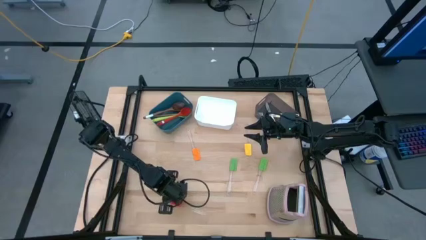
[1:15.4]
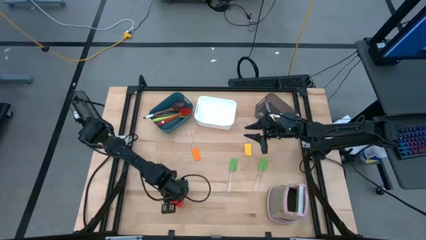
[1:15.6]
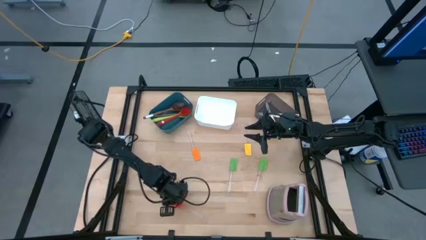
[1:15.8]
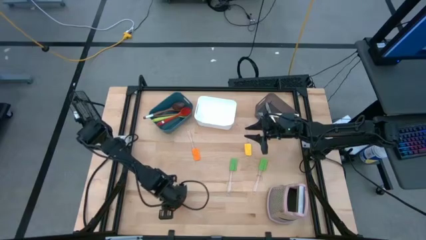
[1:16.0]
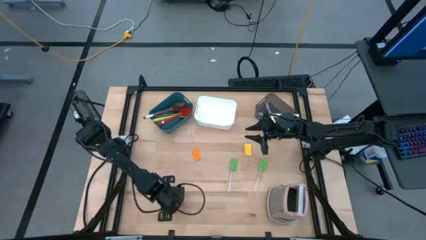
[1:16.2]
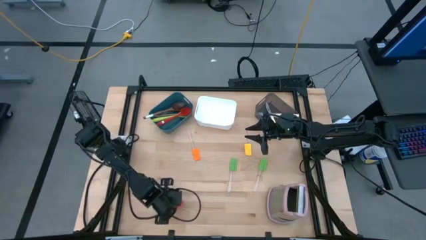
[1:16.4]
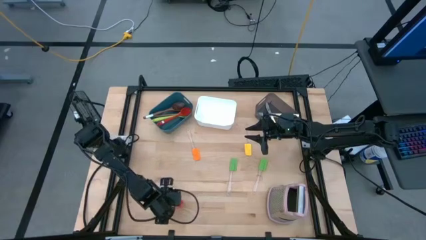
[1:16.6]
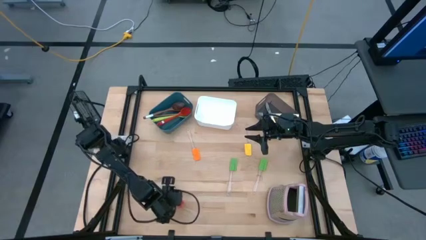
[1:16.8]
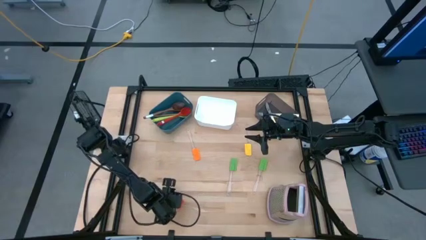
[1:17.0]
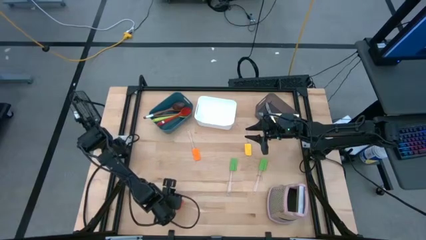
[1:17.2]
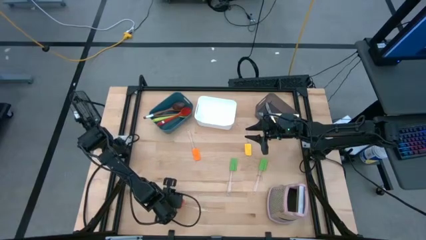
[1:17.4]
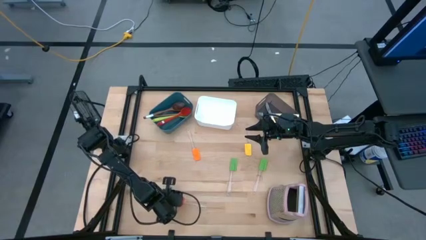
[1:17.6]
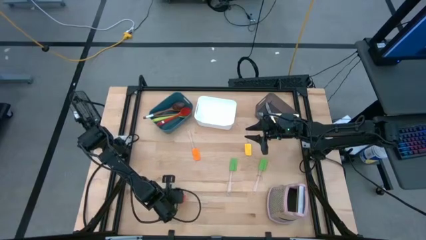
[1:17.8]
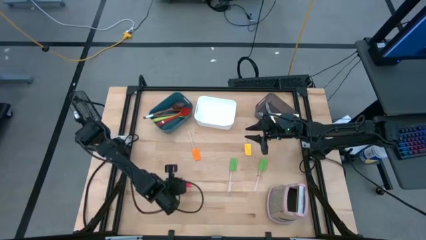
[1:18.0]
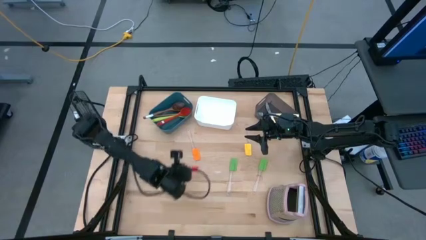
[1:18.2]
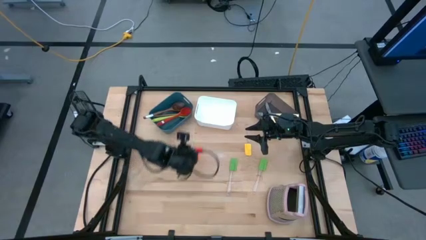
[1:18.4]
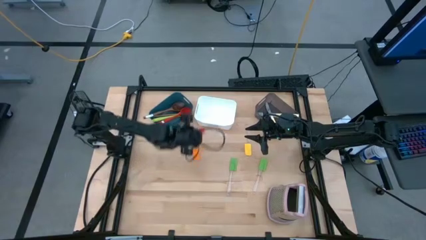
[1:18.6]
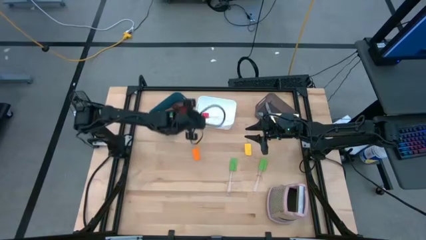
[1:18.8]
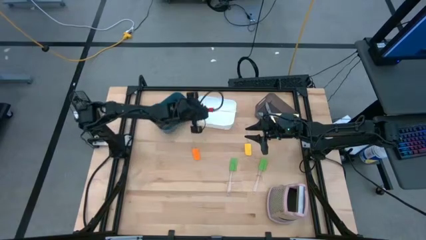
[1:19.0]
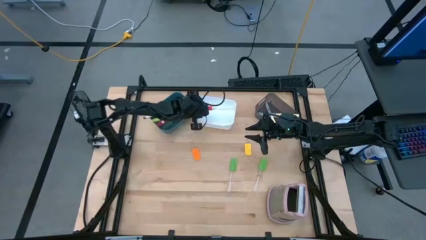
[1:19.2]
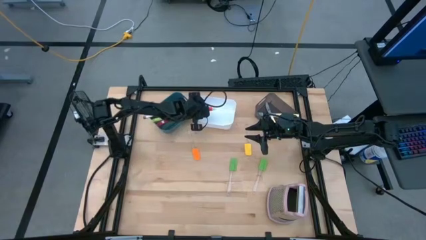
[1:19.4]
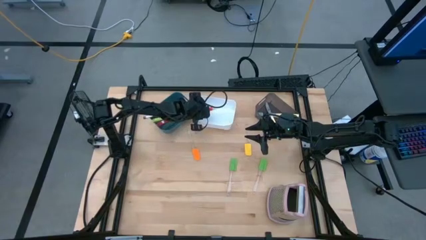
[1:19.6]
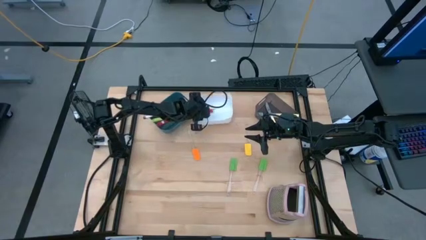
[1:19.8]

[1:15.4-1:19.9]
Task: Pick & Place Kitchen Items
Put the red spatula into the white bin

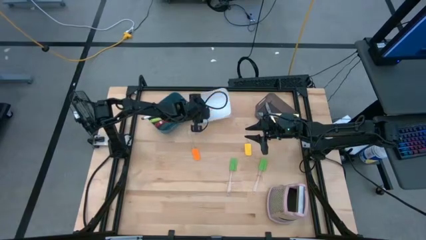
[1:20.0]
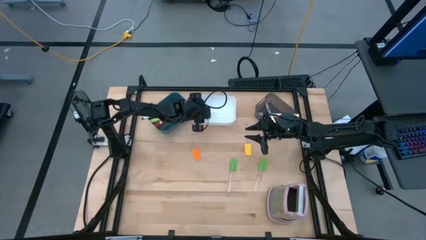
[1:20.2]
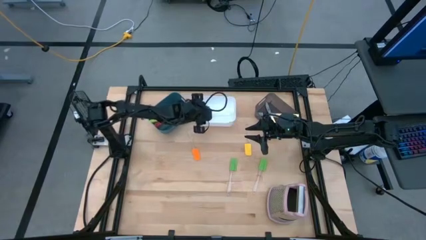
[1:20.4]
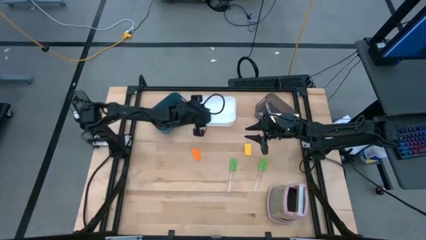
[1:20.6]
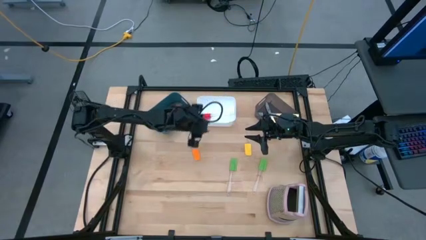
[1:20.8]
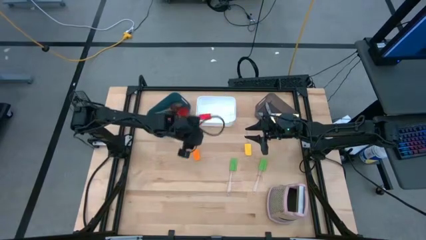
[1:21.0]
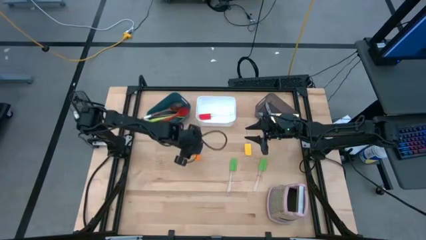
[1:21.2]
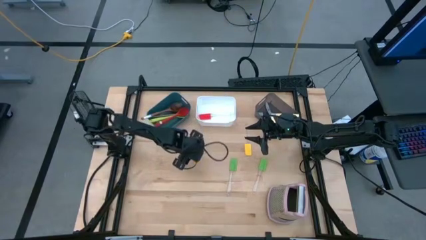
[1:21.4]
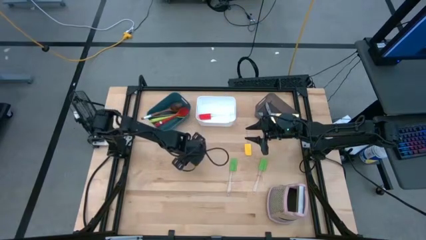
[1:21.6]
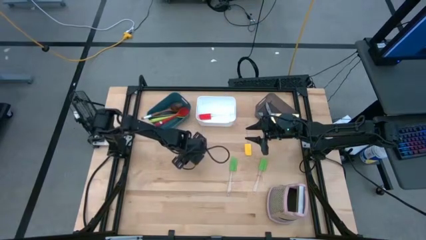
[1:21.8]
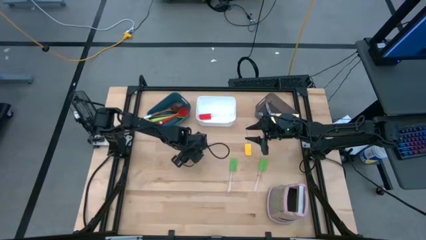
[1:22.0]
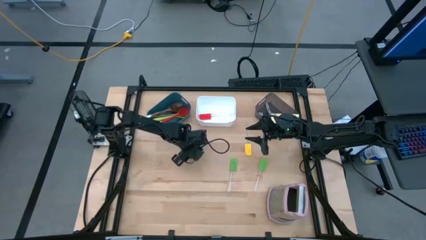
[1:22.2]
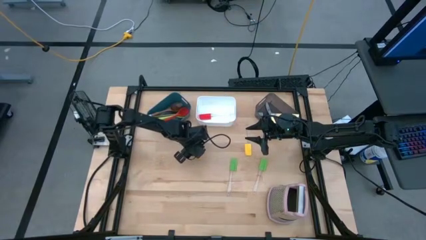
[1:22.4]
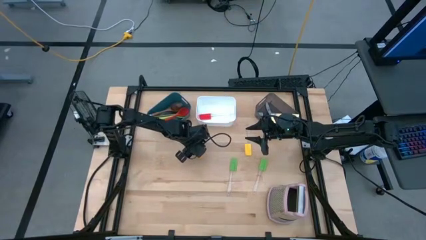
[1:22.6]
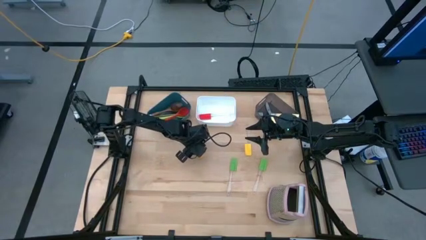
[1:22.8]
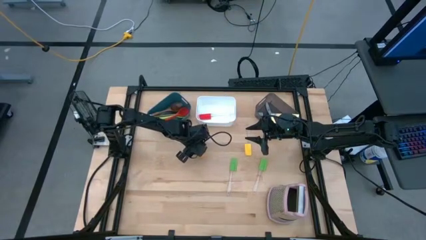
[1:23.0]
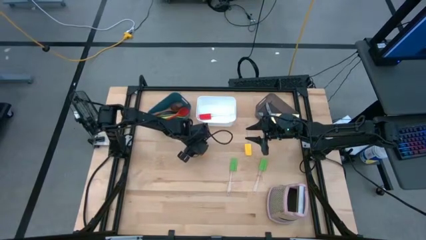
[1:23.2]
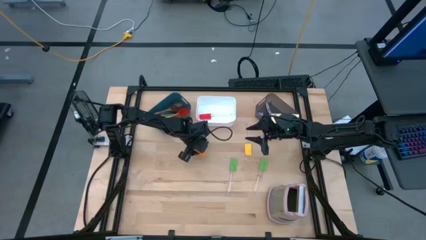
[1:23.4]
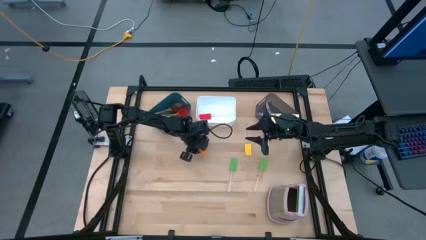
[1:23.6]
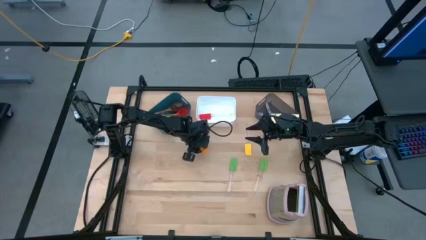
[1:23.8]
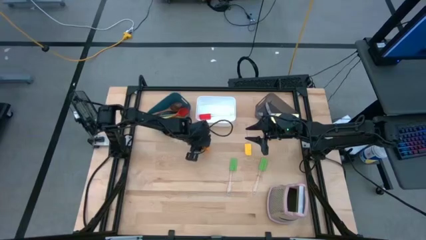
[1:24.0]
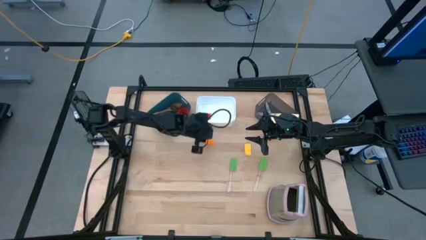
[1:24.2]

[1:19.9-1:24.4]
Put the orange spatula into the white bin

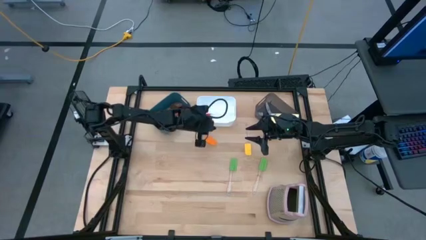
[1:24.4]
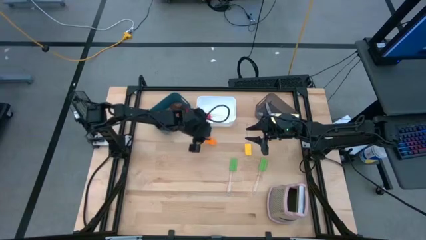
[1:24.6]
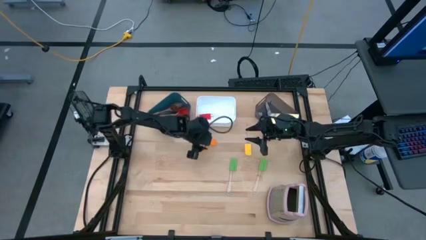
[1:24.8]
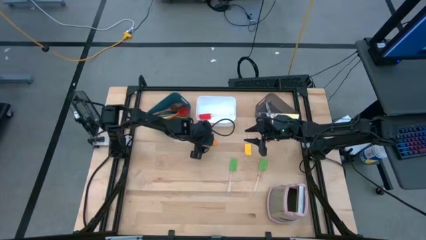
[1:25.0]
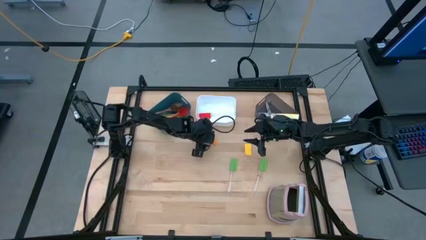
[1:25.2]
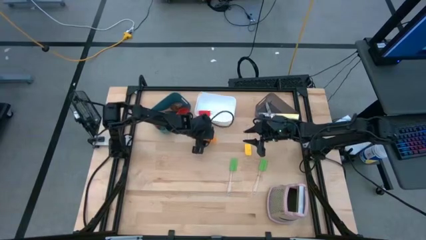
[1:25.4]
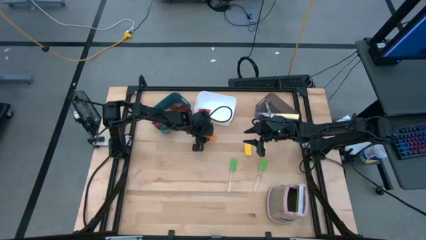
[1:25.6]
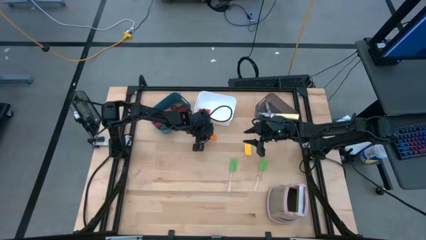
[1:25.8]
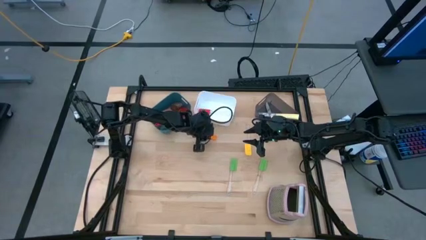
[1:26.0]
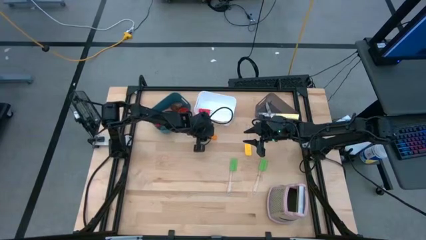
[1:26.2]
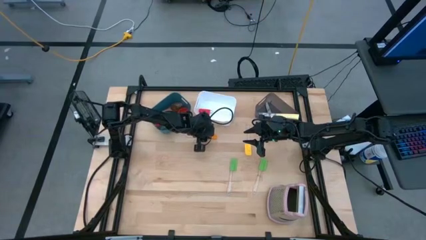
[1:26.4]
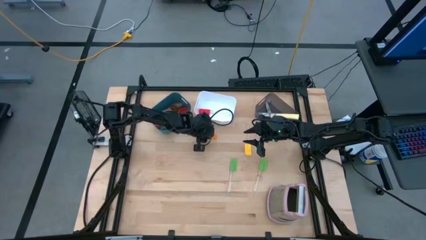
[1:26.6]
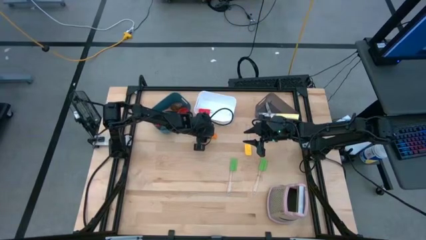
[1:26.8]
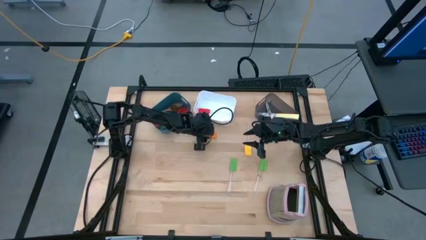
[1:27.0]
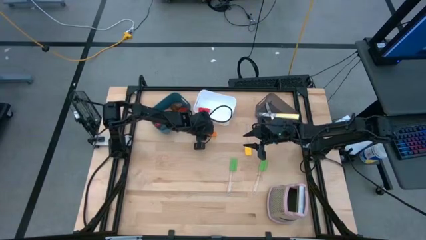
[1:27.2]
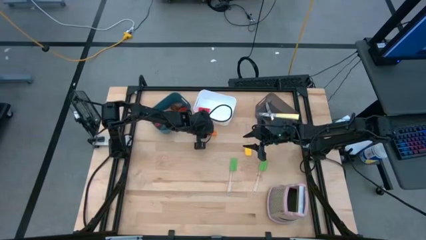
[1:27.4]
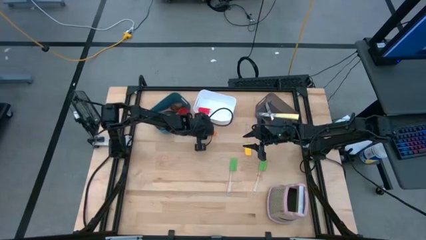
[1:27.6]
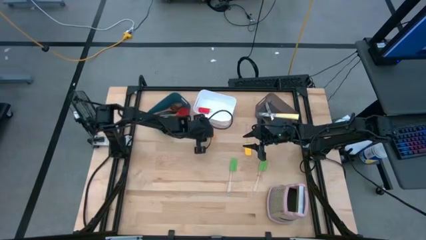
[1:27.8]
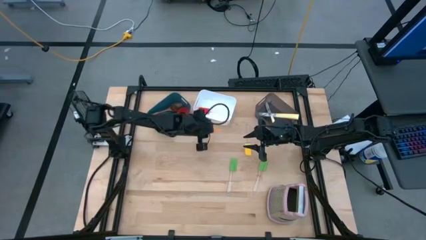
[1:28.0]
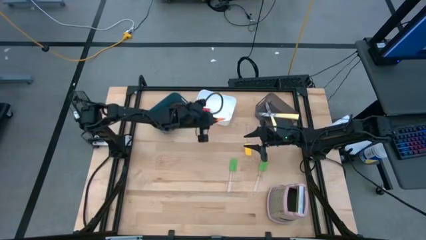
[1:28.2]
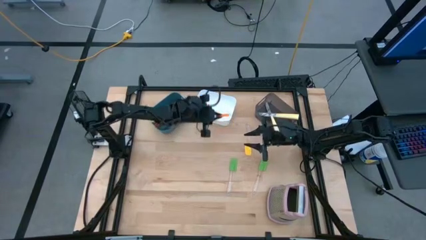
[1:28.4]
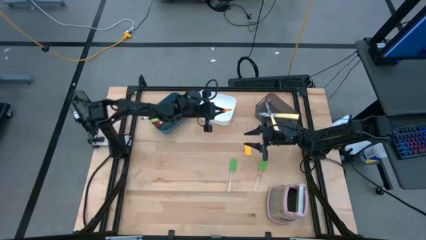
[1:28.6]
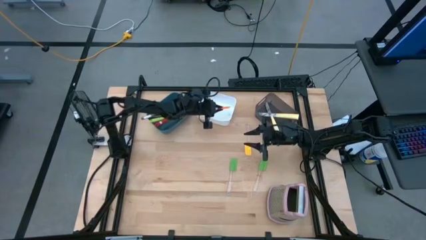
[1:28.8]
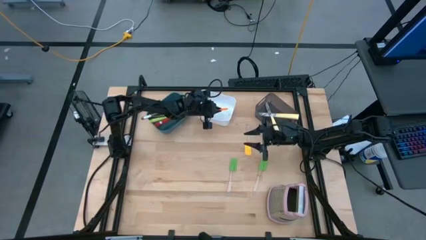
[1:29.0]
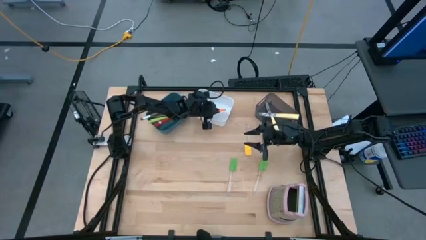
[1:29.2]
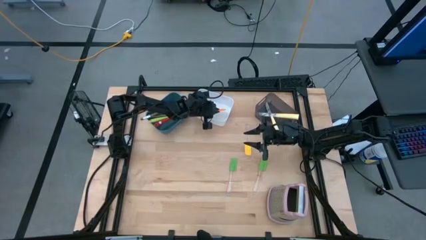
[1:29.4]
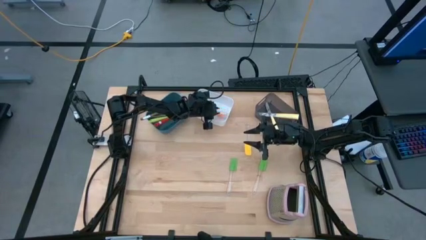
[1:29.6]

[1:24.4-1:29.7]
Put the orange spatula into the white bin

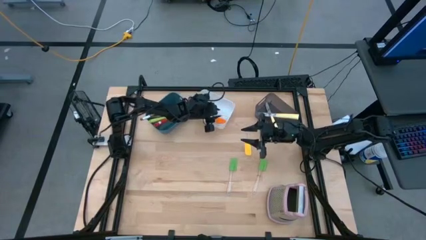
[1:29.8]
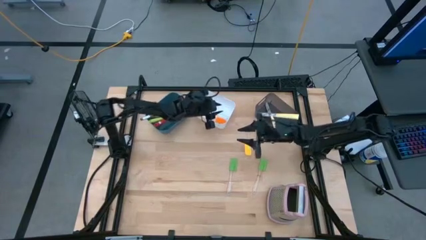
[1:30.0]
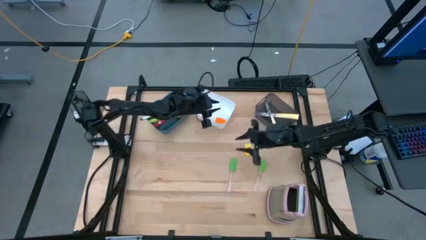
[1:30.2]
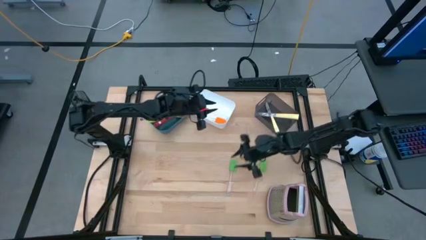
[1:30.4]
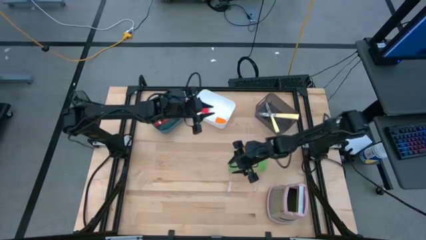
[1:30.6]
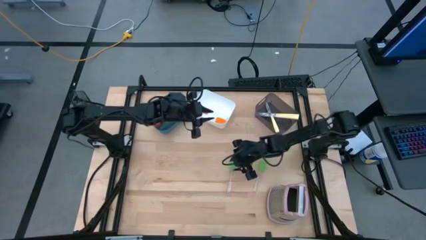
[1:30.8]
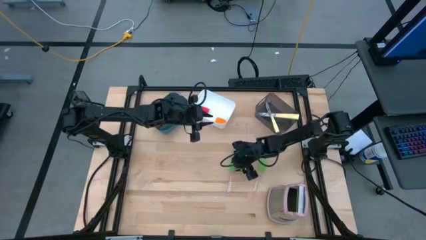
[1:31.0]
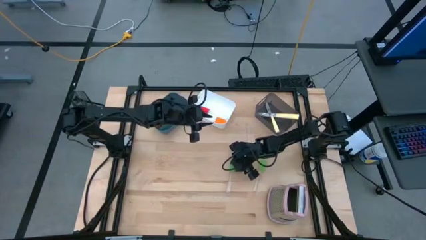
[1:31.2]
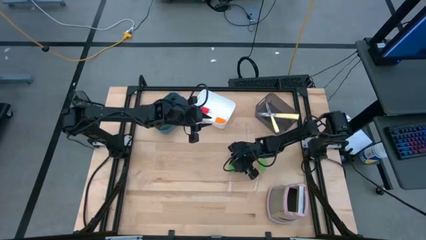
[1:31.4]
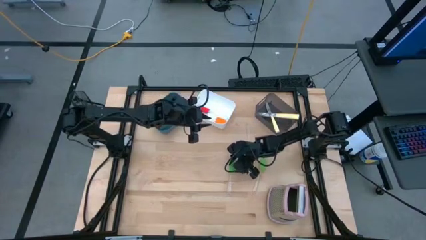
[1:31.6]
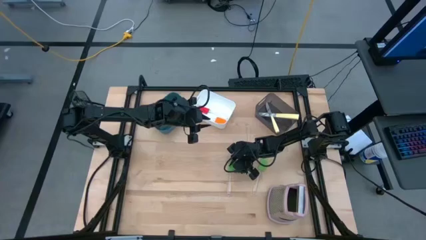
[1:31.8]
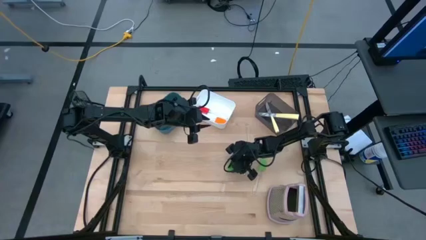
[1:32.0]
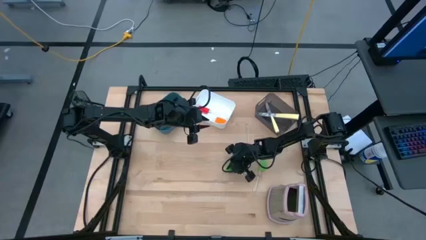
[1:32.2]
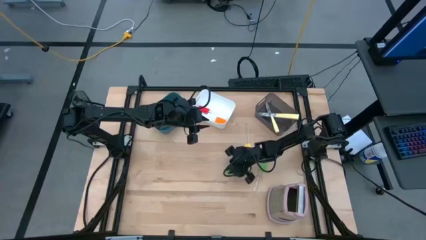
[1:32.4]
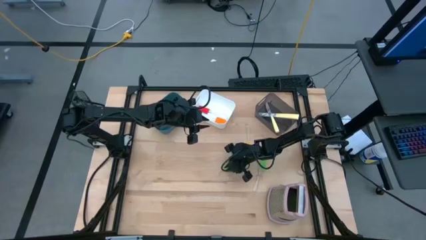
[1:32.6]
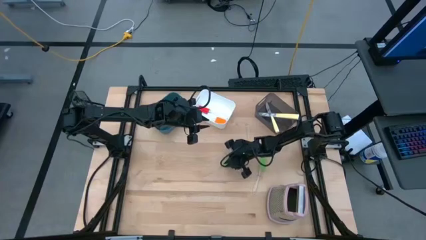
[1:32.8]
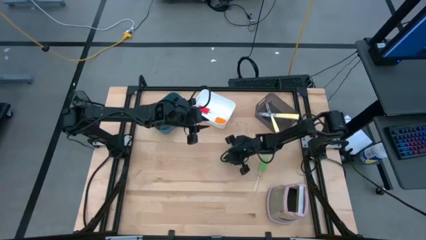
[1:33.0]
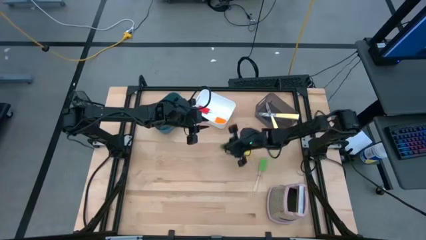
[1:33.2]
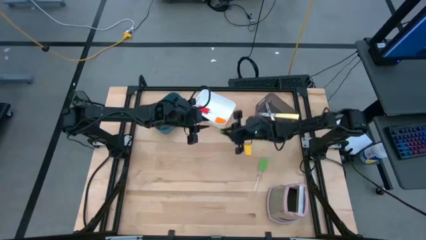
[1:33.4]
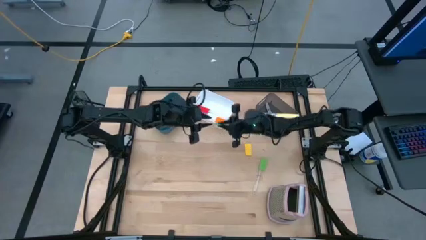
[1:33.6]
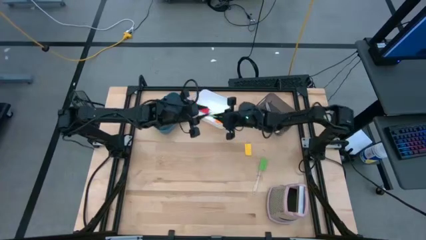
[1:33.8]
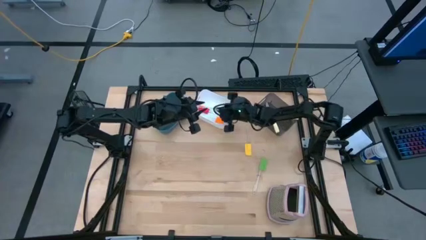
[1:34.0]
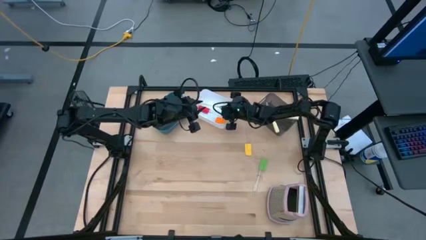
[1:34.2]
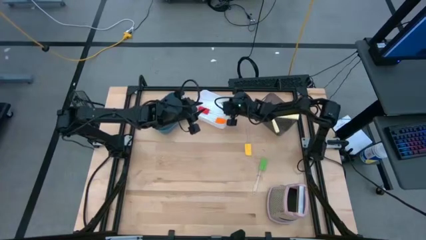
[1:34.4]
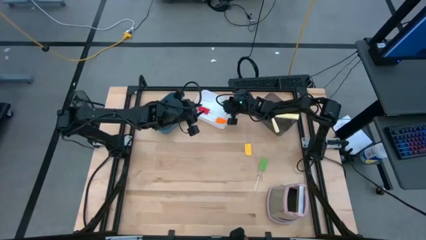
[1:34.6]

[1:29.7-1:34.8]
Put the left green spatula into the white bin
